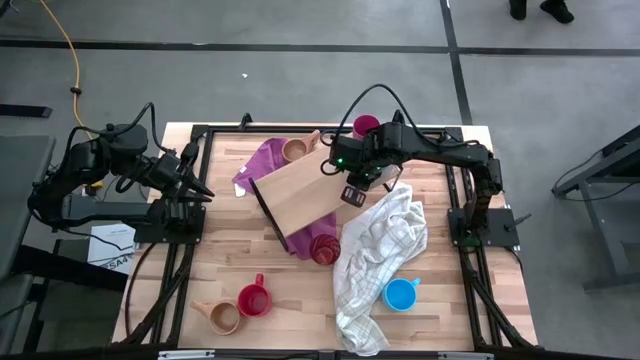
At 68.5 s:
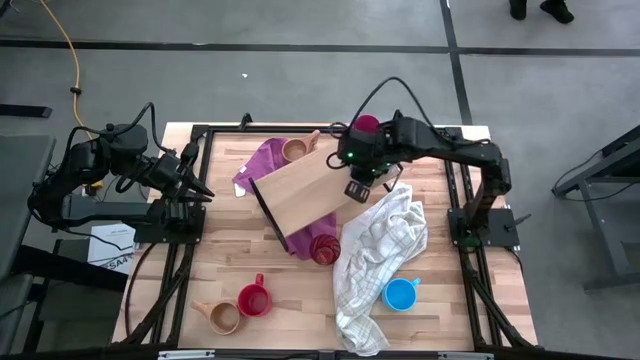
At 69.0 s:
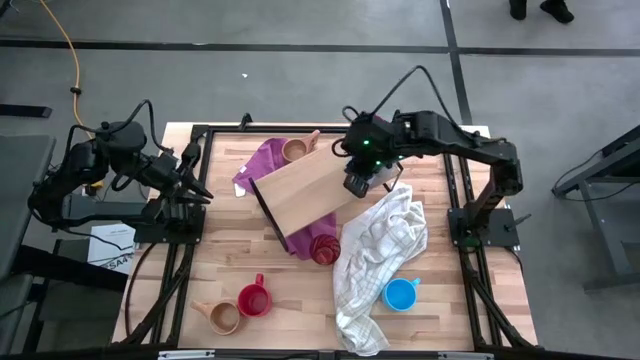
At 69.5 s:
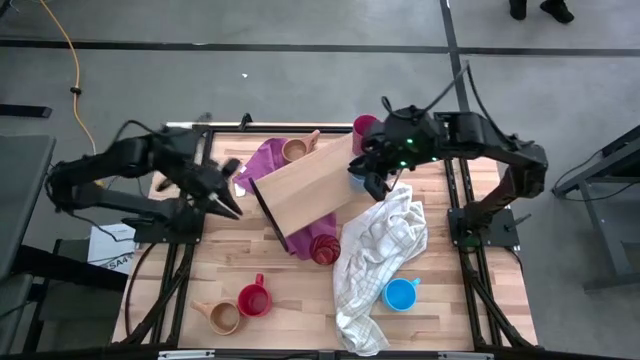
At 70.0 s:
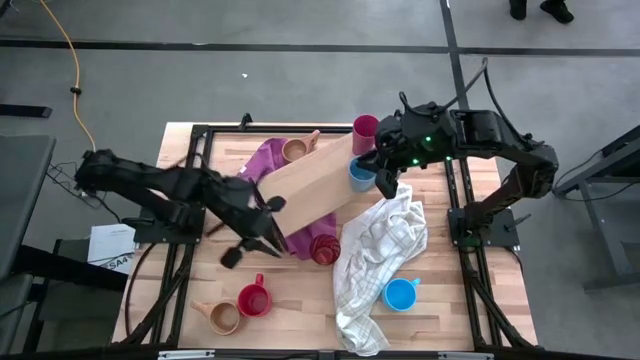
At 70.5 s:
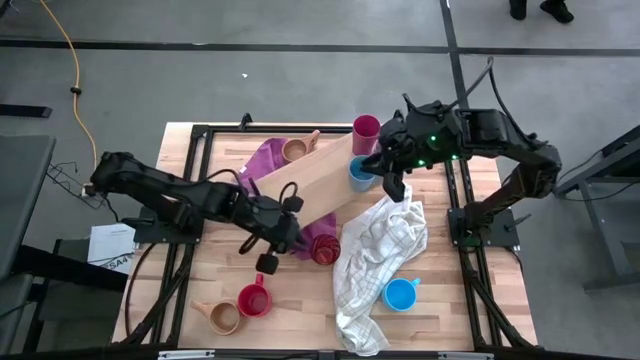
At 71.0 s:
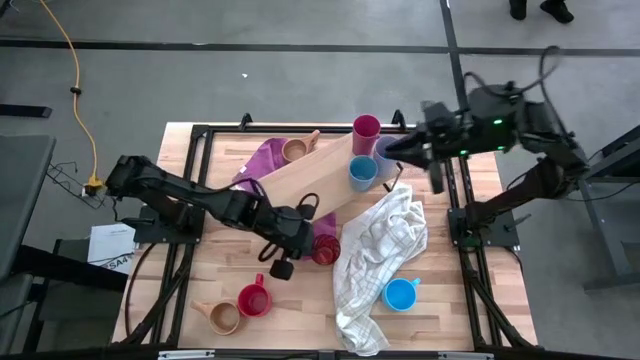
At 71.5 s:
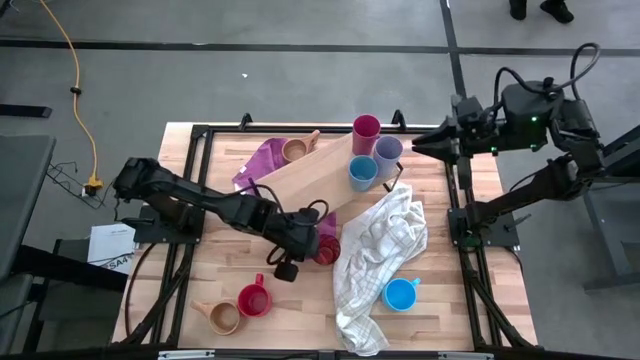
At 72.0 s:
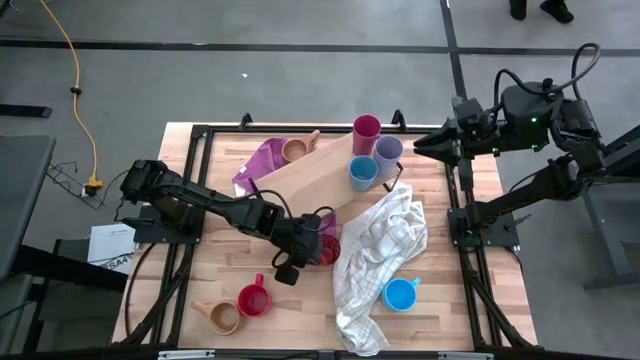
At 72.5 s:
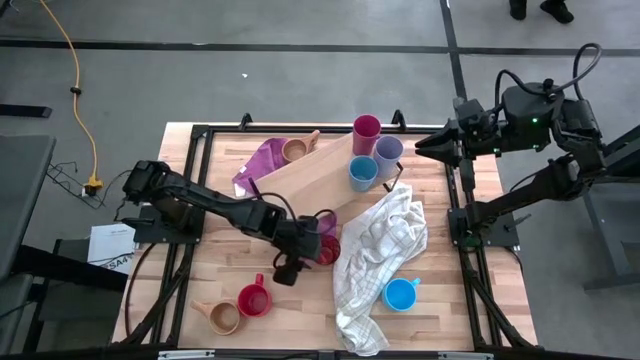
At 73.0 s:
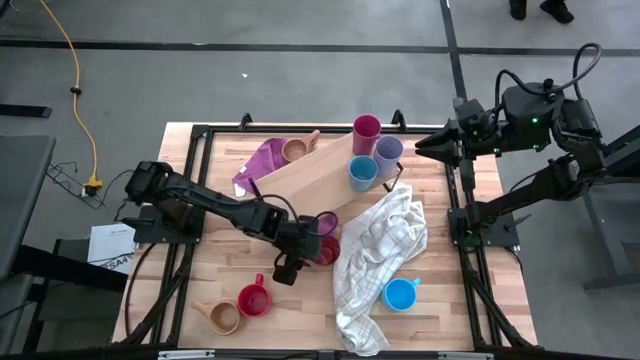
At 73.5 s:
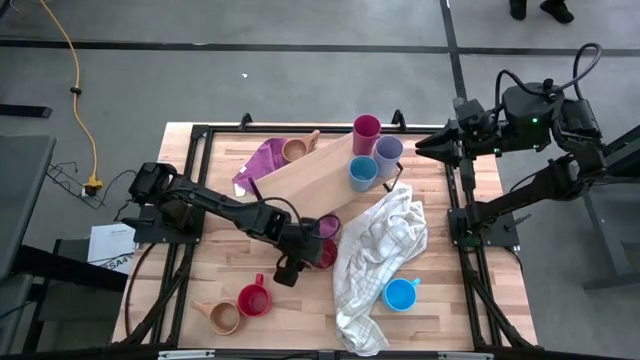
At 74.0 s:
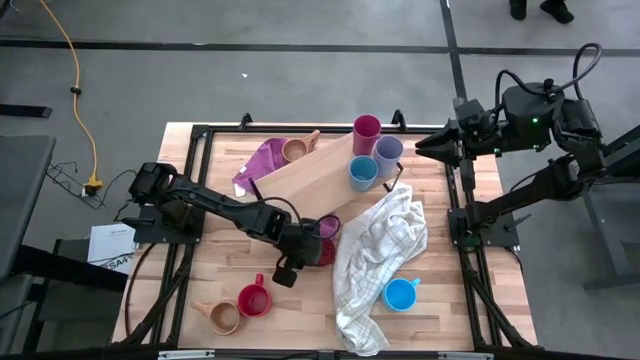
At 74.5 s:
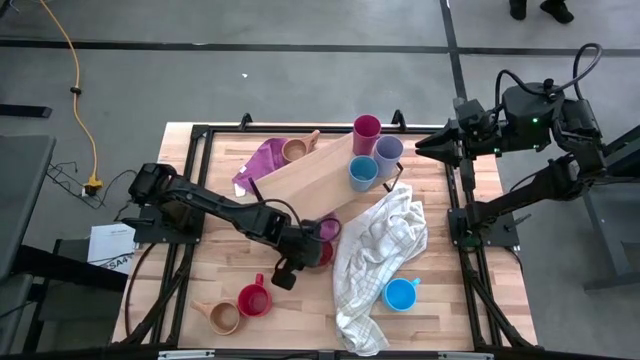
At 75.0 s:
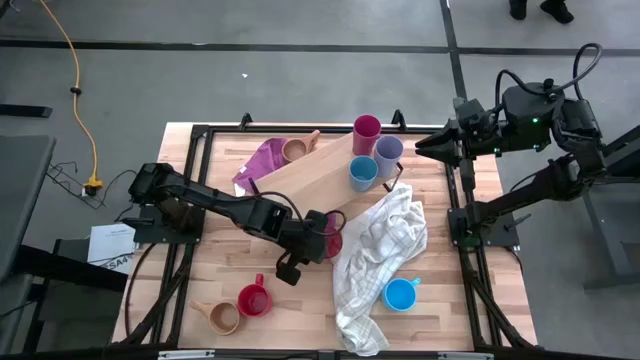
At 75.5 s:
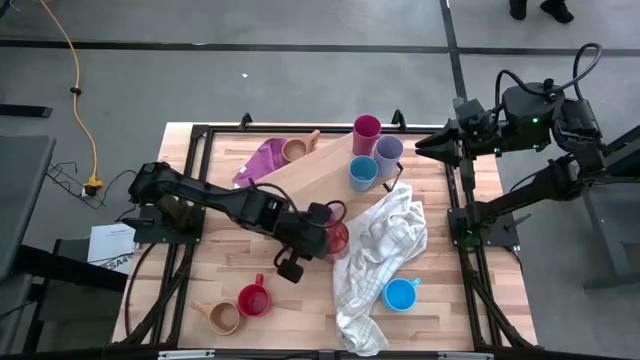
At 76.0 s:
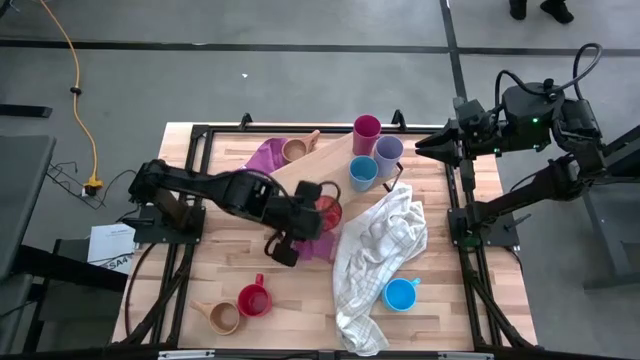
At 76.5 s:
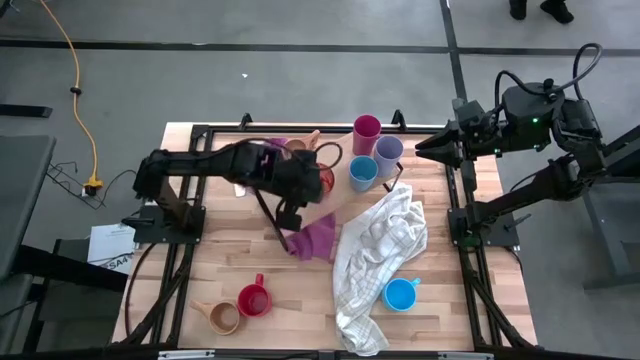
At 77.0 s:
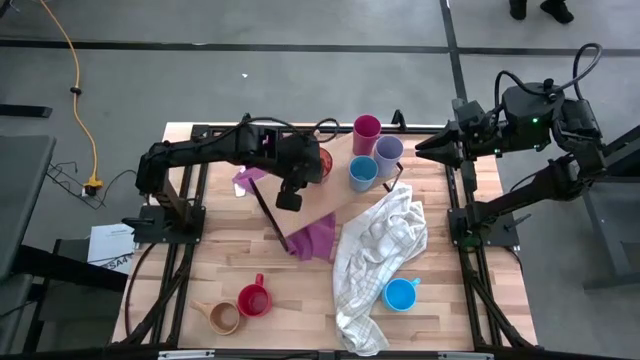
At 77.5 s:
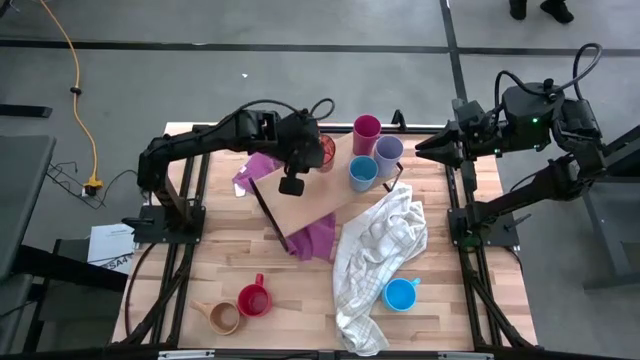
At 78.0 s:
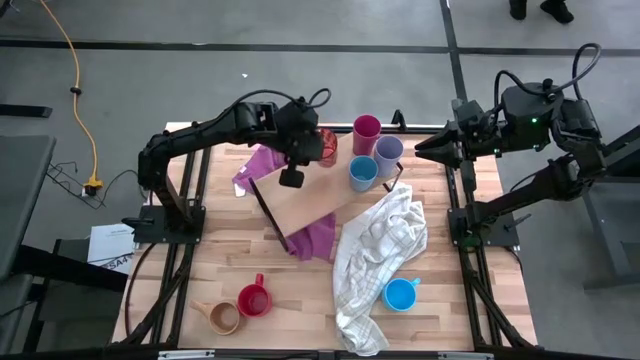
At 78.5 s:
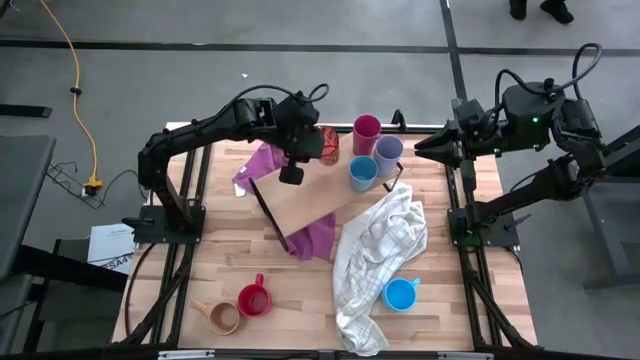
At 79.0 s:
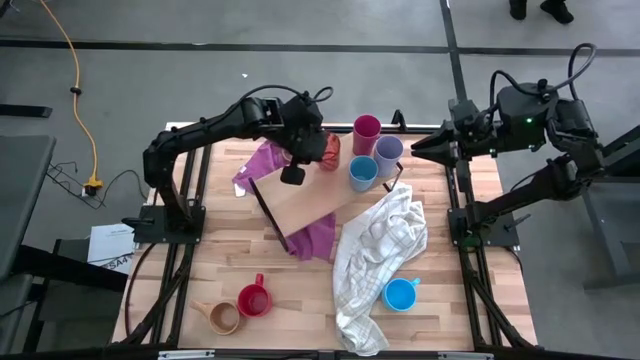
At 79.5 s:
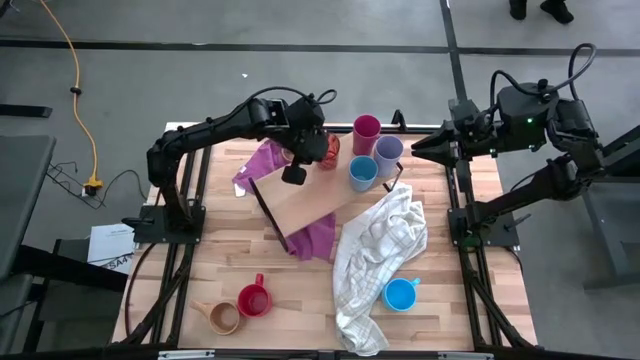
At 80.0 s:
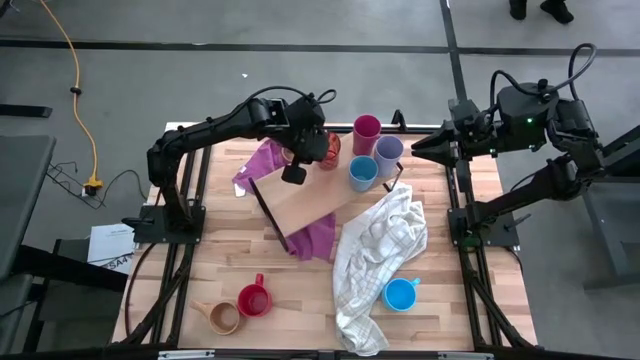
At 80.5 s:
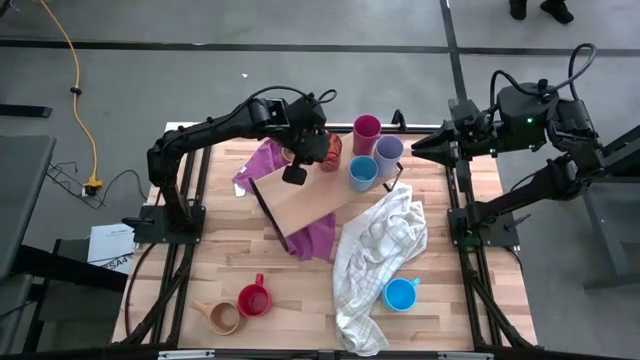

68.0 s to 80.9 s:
Task: Stack small to large cups/mugs on shelf
Put the red cup on the shelf

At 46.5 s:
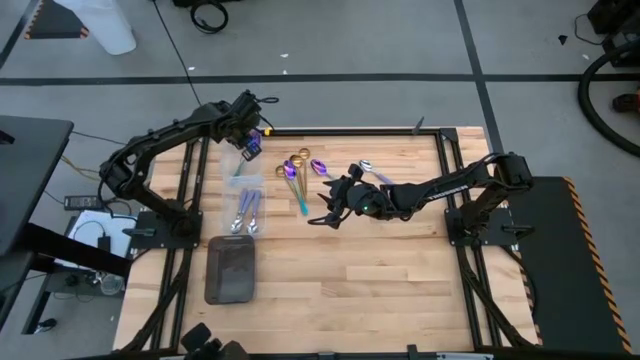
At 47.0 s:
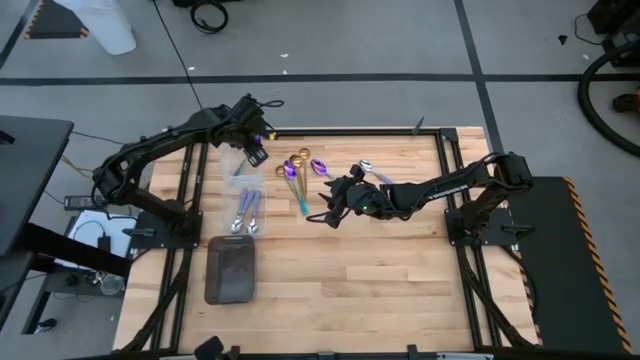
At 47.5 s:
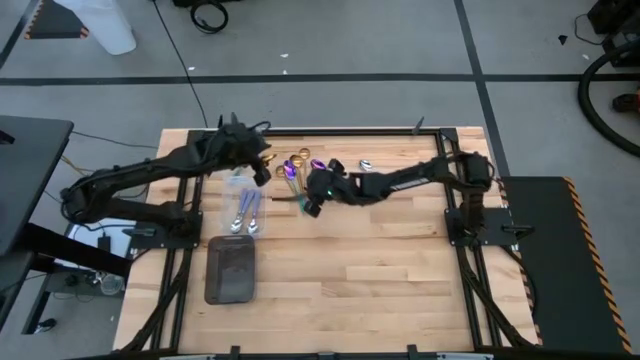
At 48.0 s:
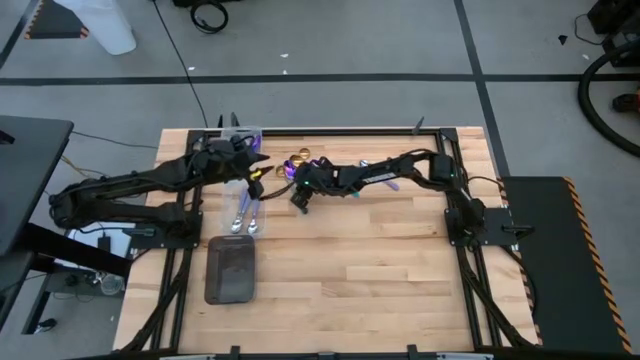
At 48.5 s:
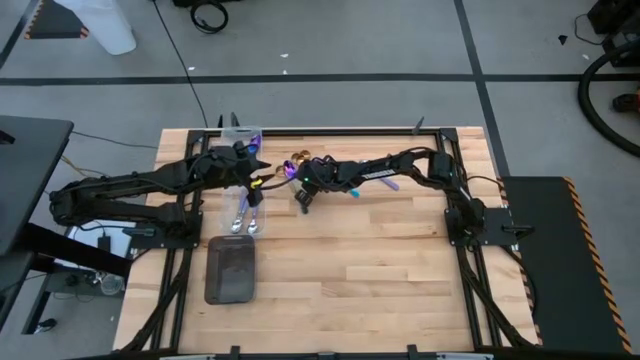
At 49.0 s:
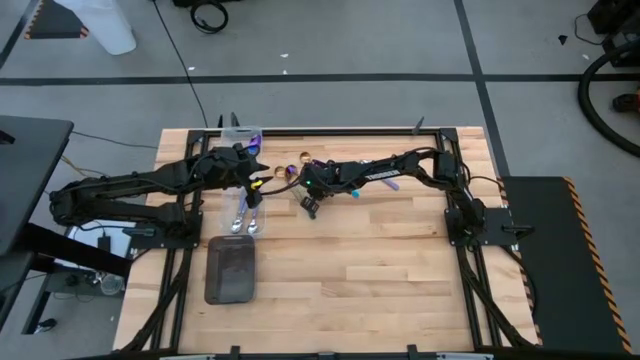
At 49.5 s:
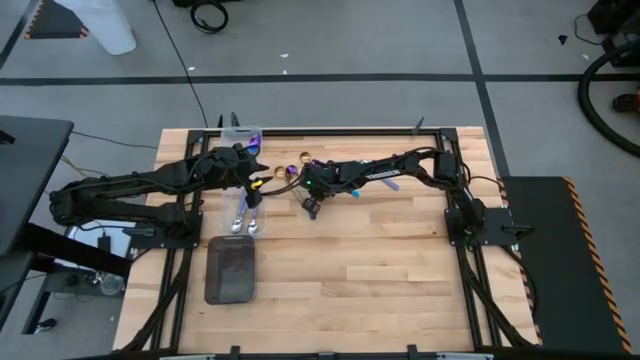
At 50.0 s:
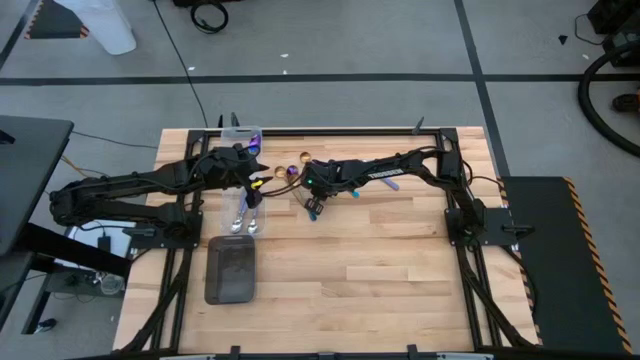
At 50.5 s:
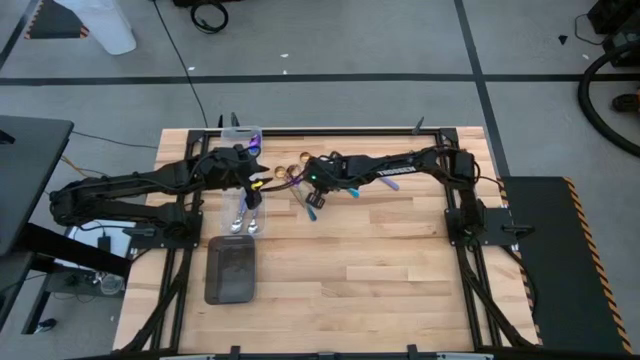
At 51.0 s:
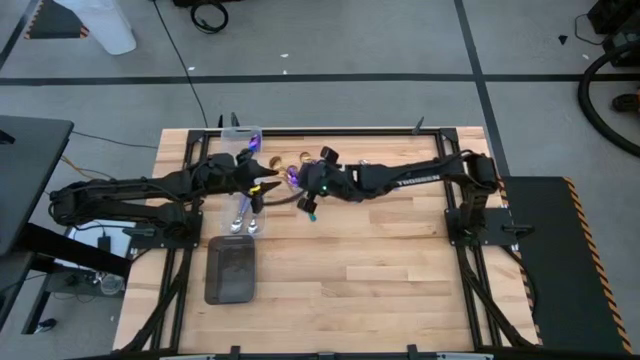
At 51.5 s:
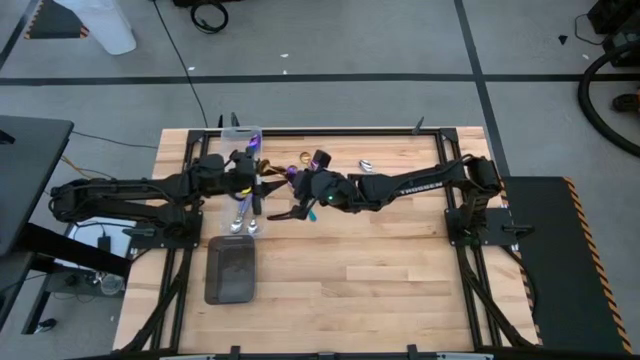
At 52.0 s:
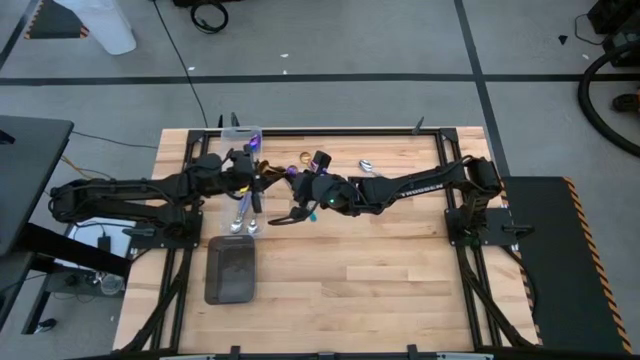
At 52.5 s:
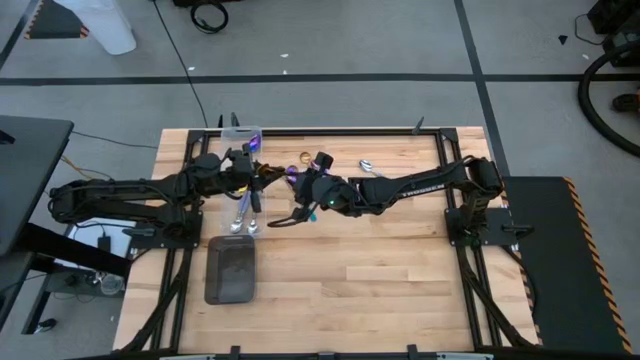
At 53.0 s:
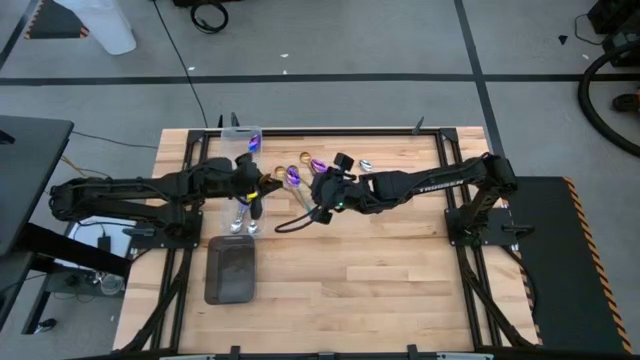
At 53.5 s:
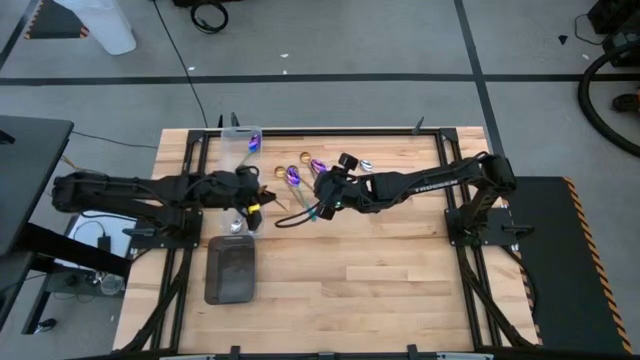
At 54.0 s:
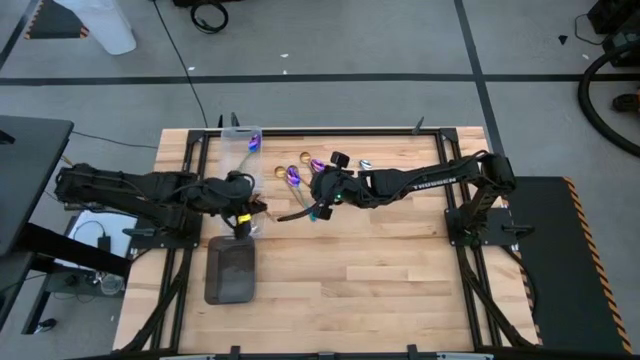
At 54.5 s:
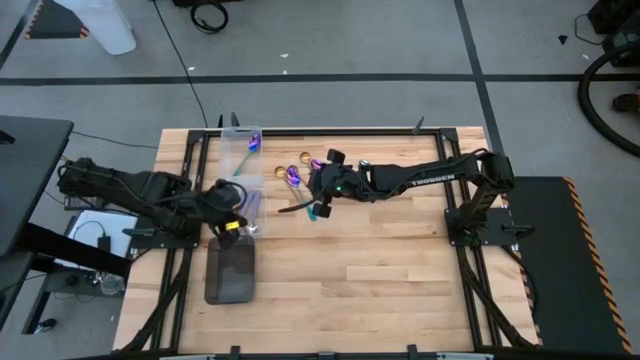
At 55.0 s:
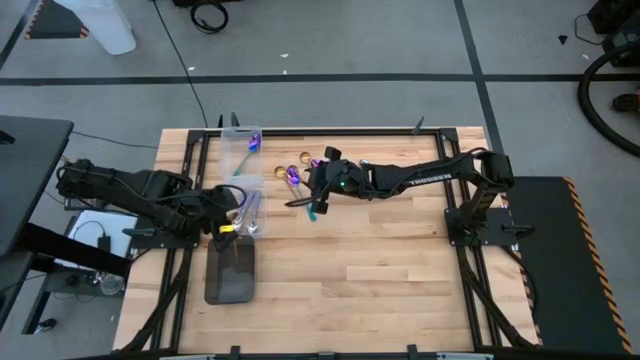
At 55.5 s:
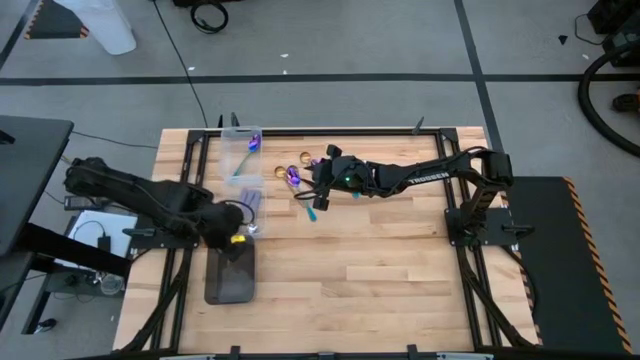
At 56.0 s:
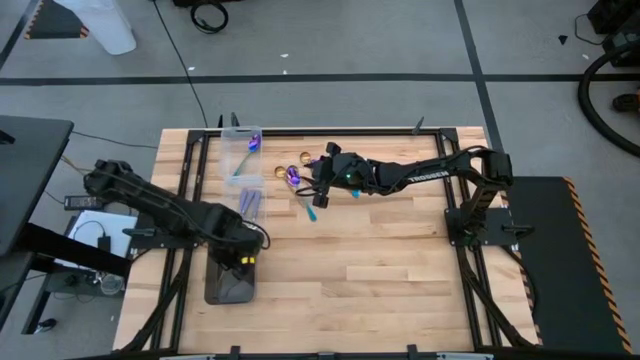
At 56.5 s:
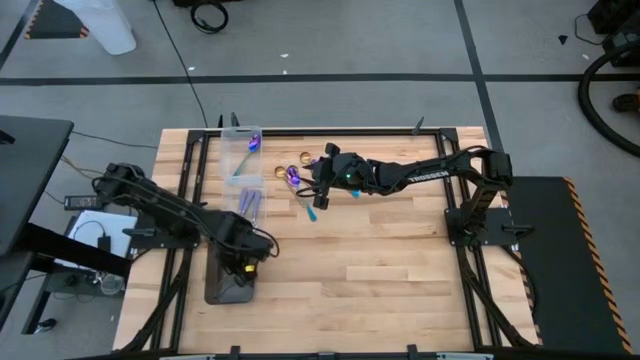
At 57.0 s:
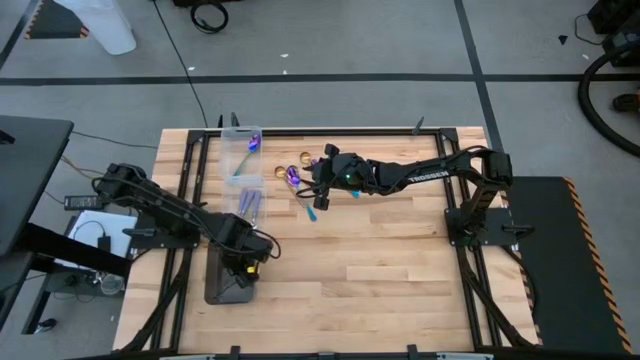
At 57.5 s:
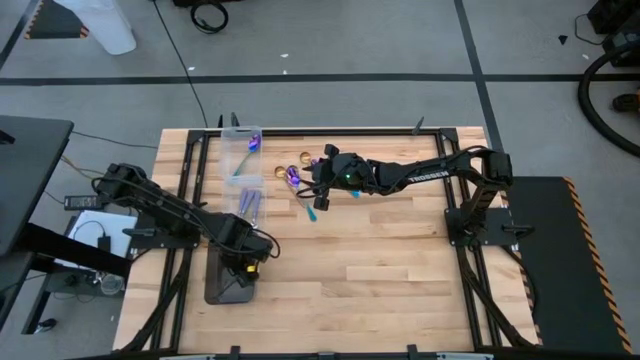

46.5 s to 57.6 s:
Task: Sort silverware by color (type)
Put the gold spoon into the black bin
